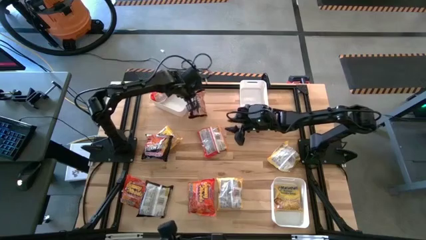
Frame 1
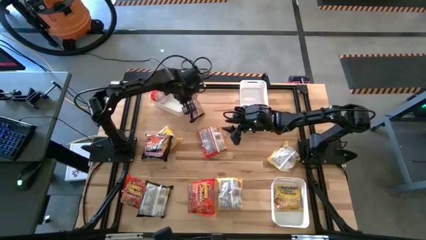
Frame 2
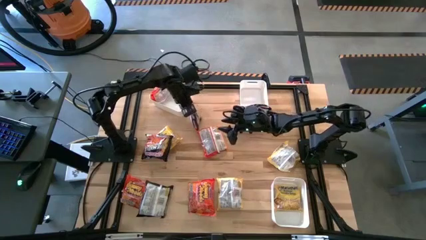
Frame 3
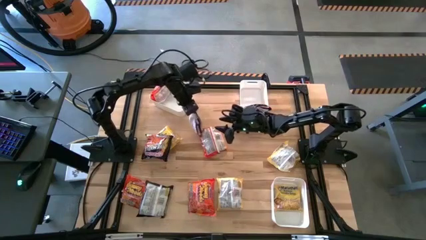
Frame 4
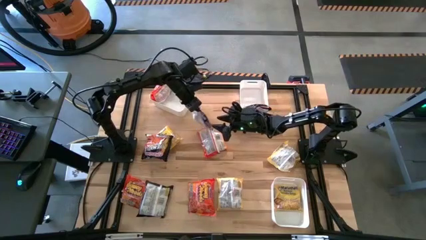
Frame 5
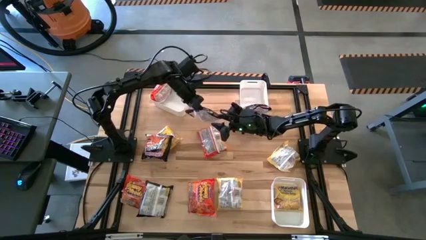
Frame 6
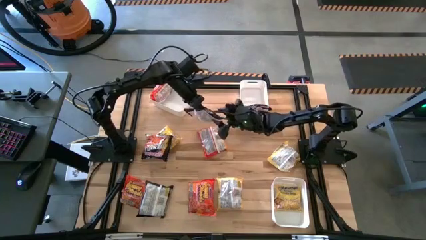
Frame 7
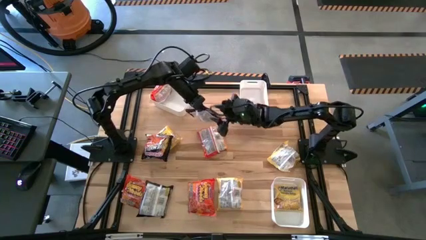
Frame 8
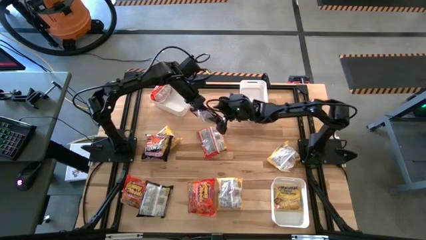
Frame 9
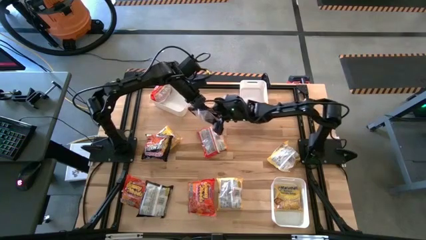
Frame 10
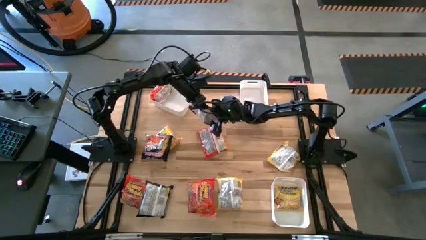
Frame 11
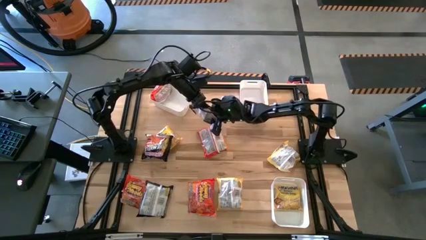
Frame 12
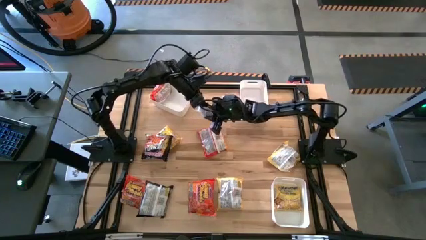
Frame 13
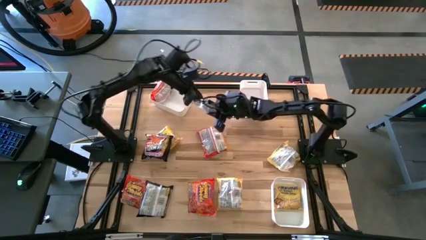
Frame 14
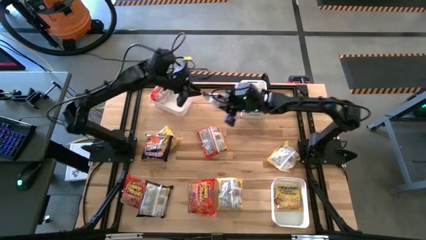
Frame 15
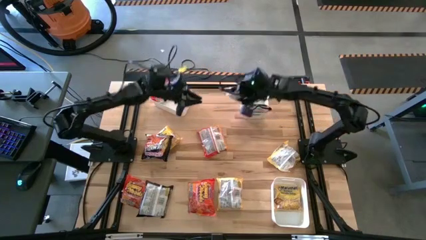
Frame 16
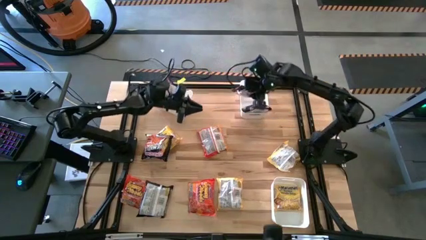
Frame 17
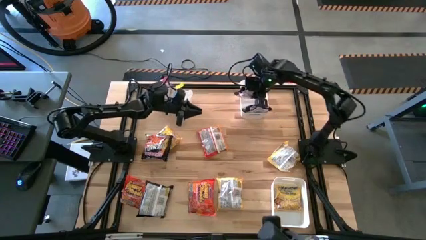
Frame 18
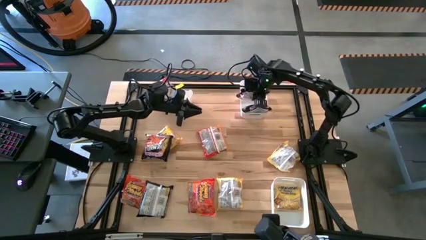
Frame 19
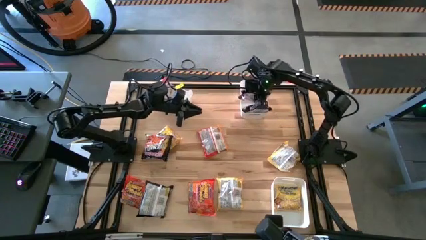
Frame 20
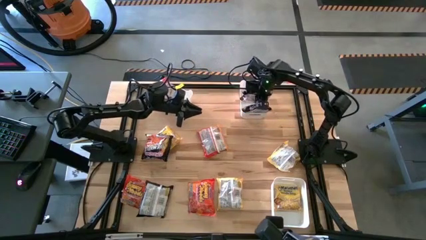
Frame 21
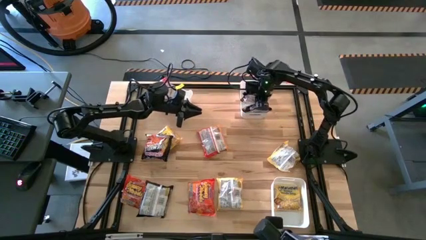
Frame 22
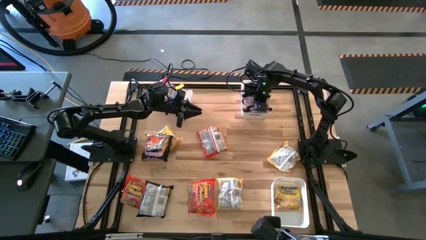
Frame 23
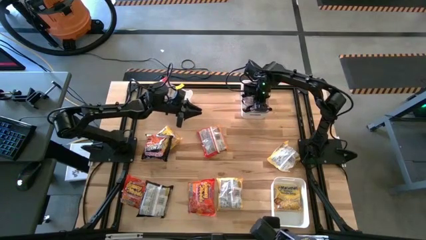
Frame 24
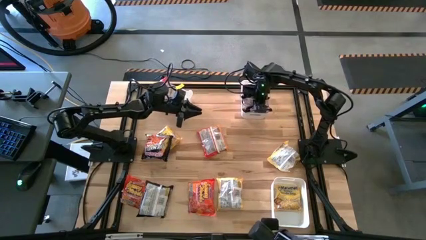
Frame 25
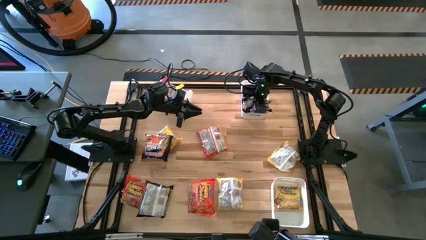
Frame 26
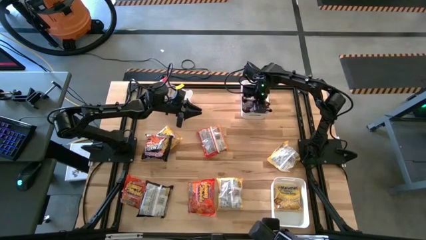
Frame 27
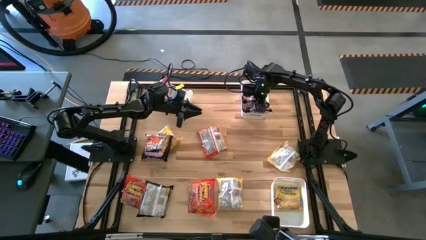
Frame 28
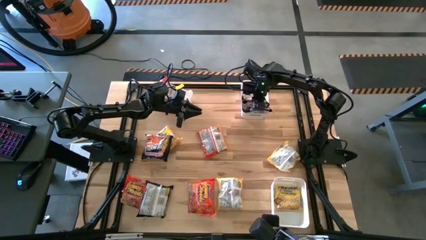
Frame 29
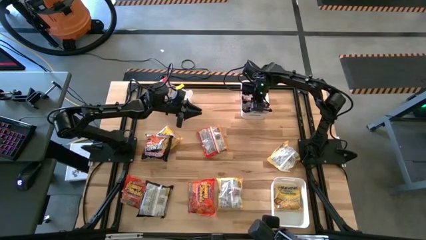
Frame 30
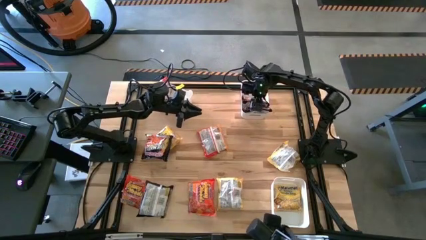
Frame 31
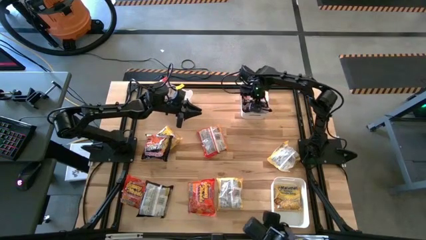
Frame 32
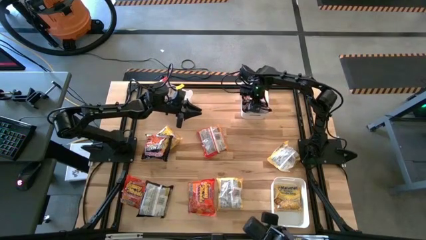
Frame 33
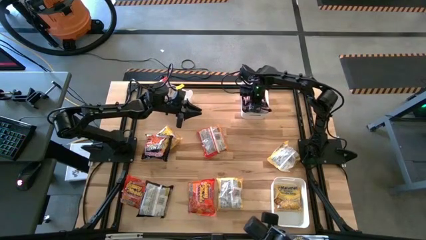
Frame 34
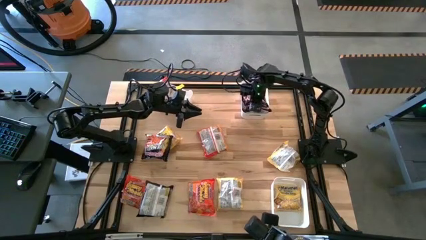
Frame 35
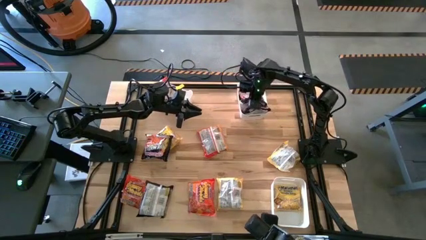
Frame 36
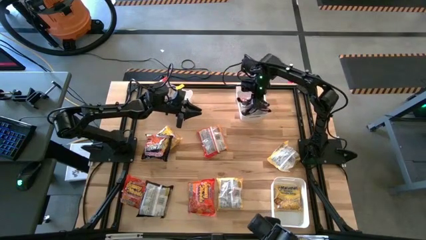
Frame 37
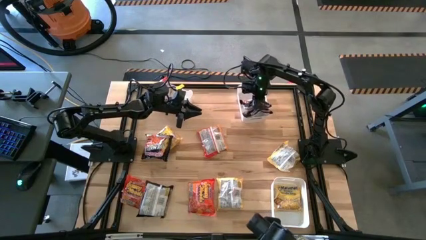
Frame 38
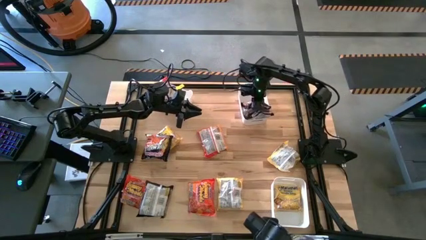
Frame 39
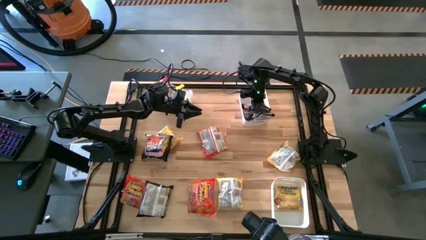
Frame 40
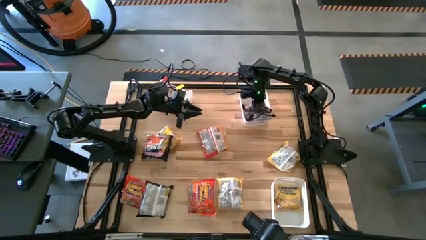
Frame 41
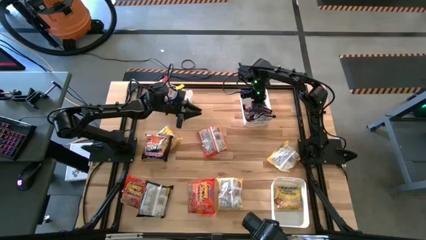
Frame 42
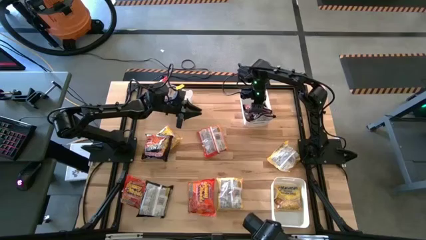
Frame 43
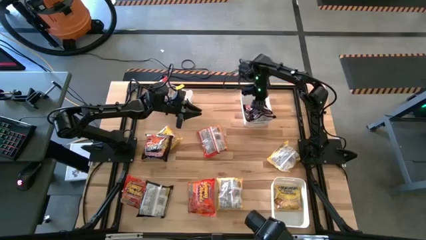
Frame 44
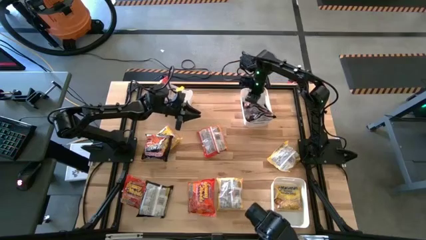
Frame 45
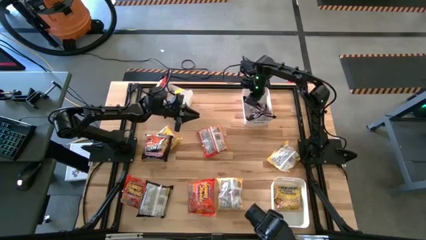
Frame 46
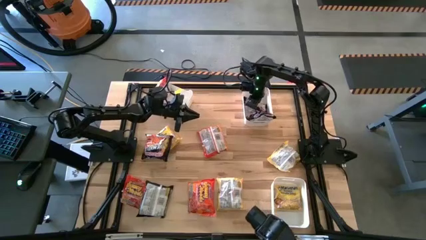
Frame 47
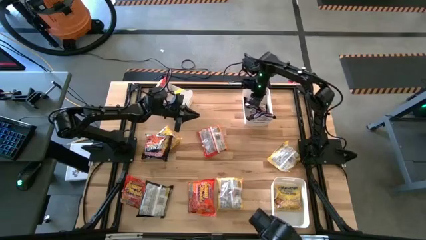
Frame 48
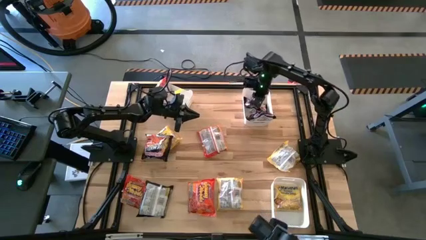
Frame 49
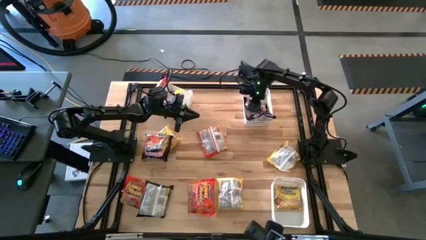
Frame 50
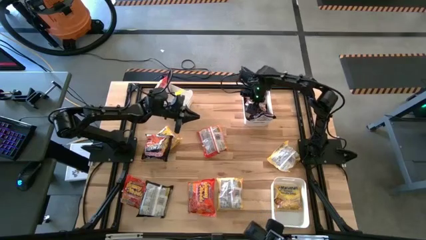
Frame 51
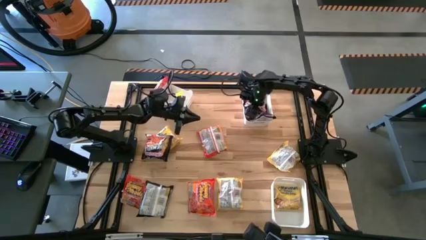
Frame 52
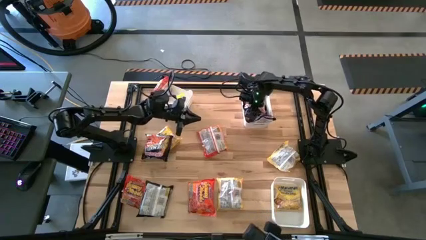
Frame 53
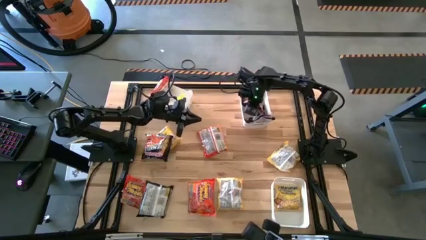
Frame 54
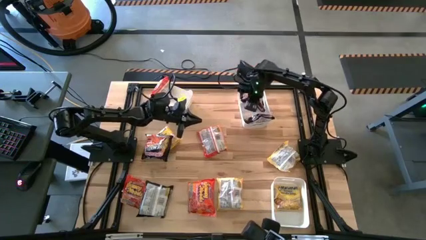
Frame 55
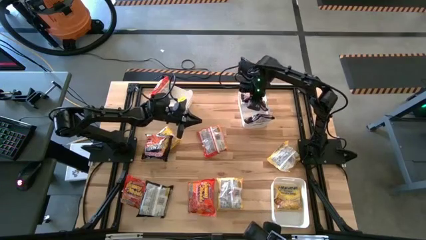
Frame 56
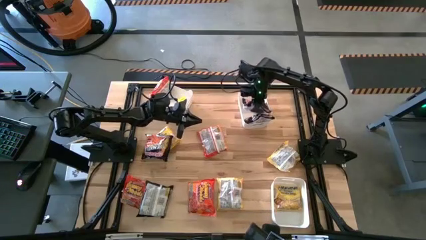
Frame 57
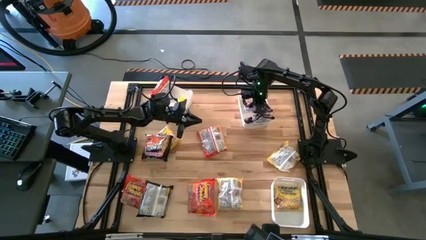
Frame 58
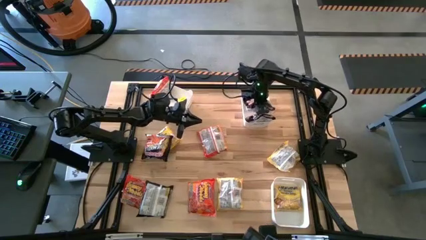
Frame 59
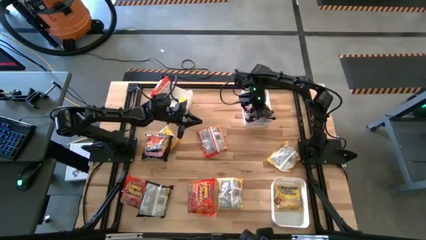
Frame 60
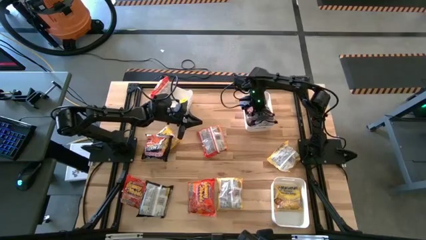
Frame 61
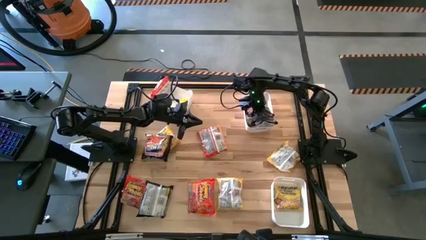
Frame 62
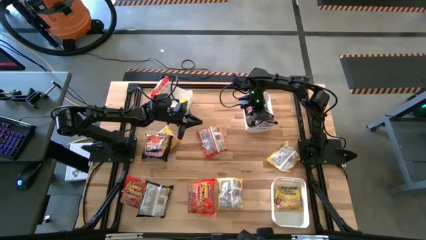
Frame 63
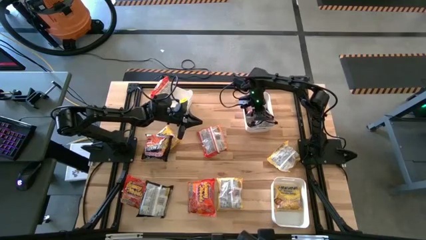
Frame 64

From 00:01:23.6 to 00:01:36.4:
Task: Sort Maruchan noodles
Put the black noodle pack into the top right white bin

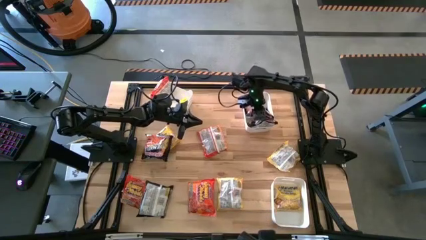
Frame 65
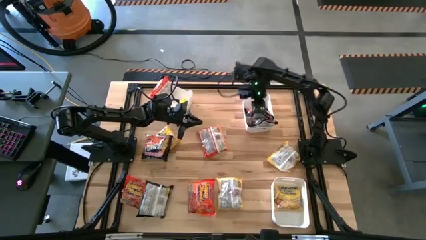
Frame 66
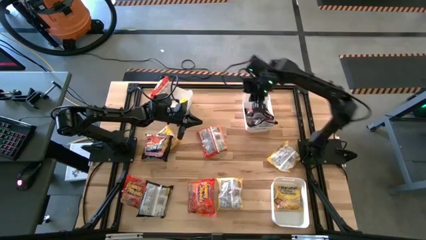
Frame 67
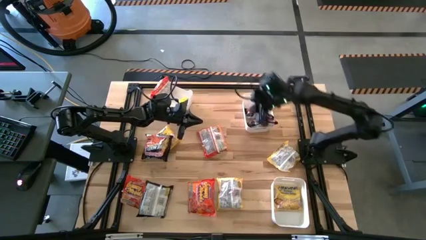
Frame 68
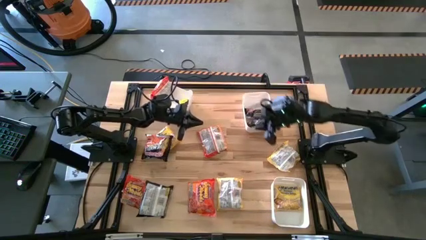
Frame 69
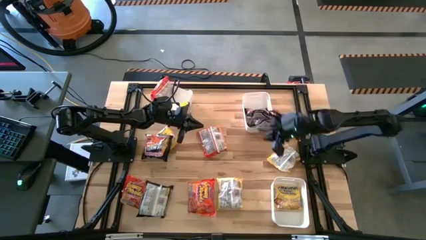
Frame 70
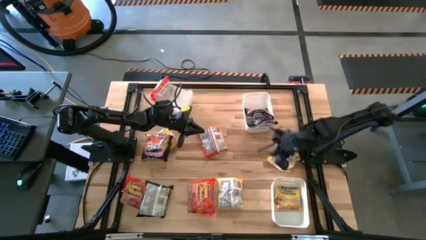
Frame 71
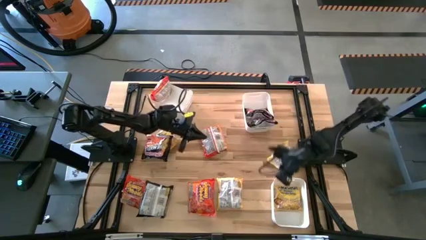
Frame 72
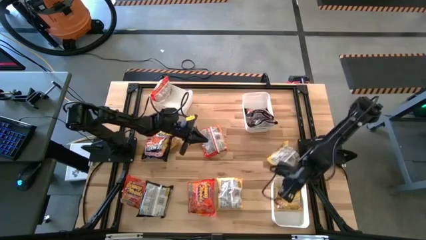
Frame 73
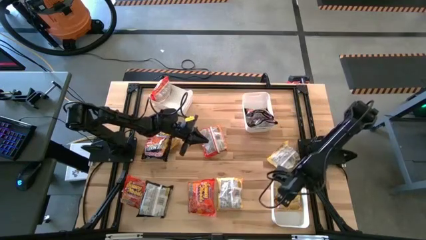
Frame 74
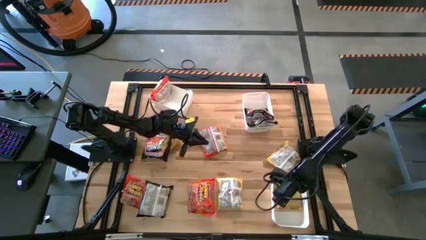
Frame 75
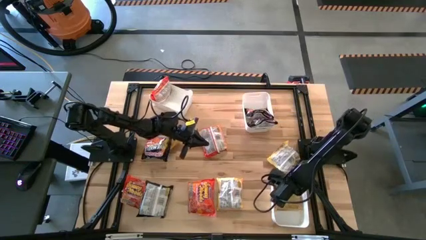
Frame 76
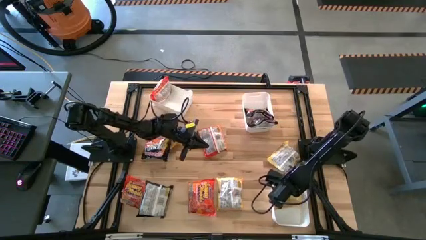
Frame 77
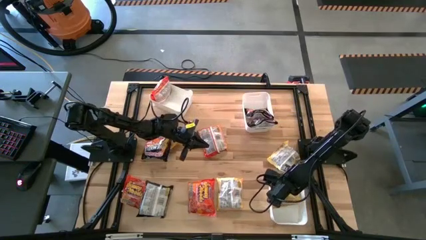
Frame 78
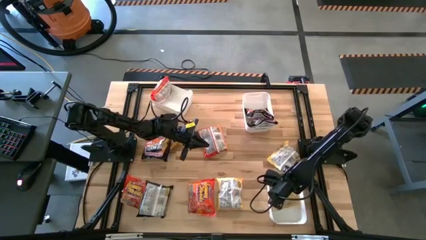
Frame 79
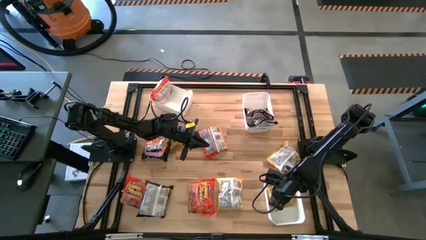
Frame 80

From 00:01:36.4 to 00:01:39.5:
Adjust the yellow noodle pack in the bottom white bin
